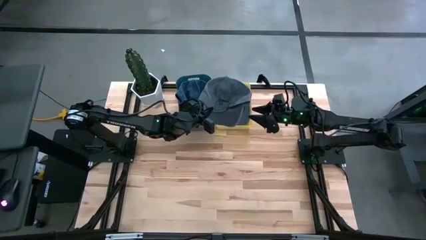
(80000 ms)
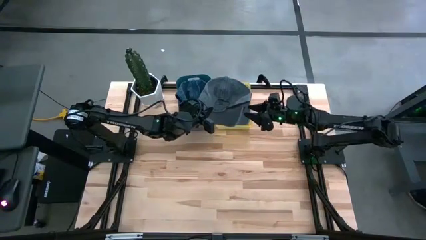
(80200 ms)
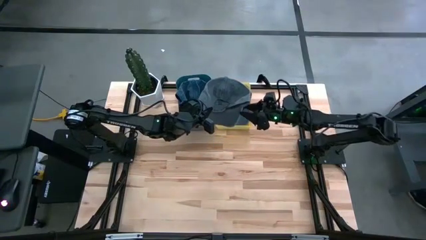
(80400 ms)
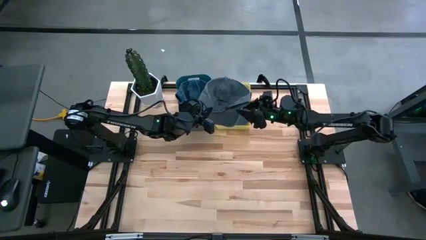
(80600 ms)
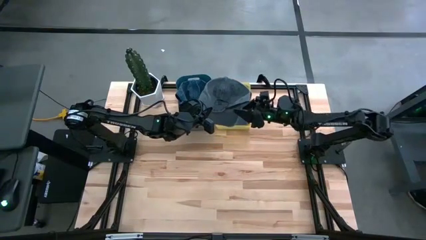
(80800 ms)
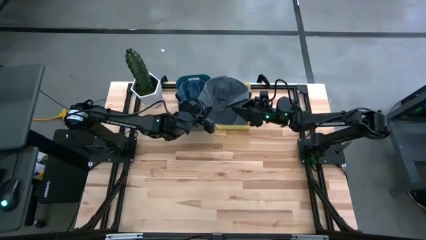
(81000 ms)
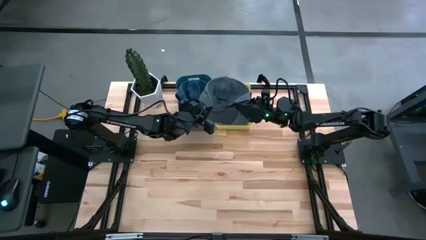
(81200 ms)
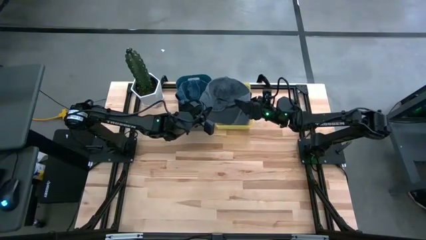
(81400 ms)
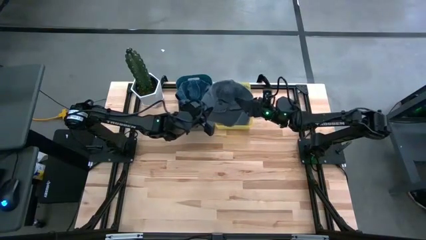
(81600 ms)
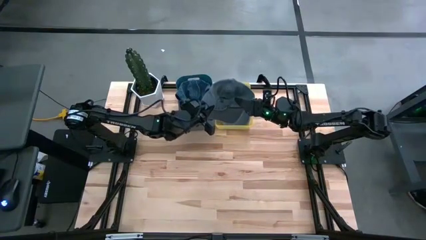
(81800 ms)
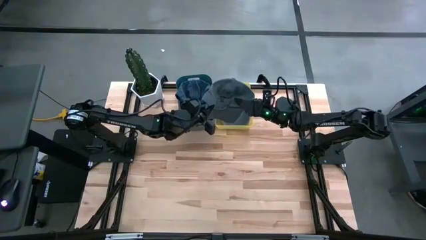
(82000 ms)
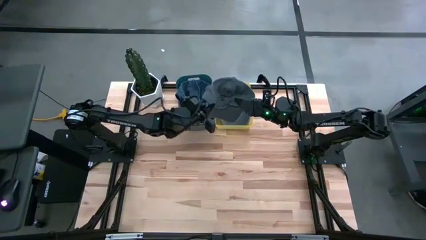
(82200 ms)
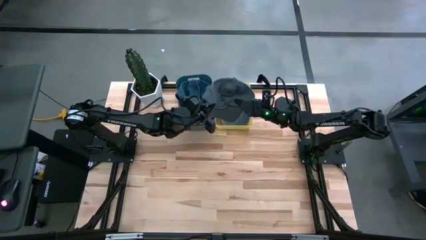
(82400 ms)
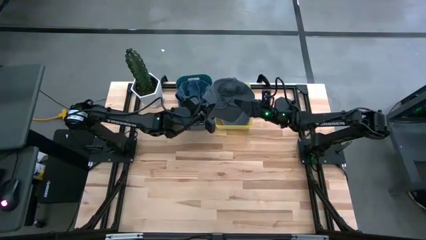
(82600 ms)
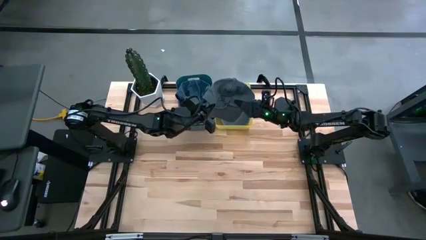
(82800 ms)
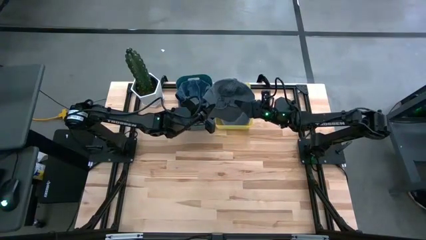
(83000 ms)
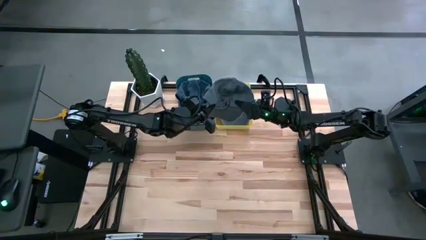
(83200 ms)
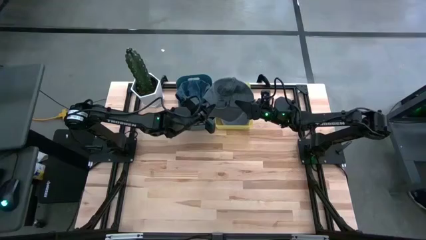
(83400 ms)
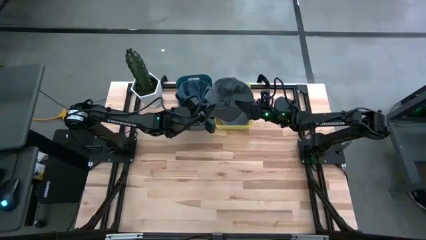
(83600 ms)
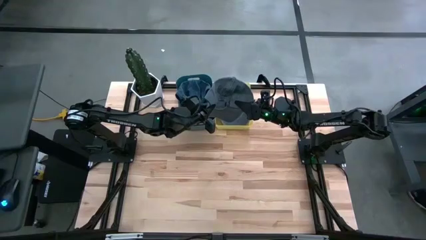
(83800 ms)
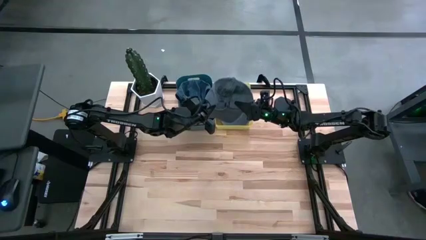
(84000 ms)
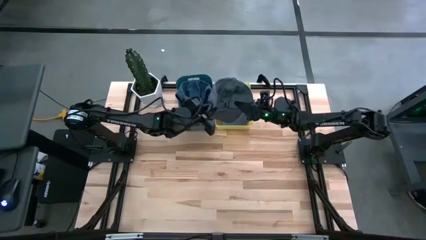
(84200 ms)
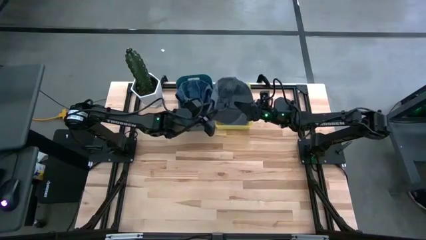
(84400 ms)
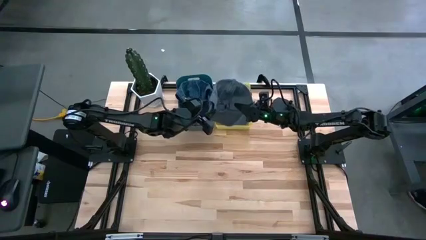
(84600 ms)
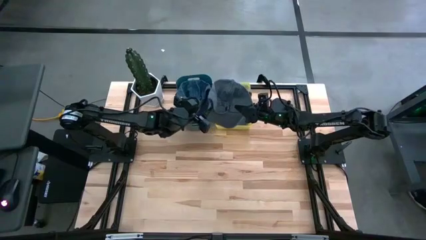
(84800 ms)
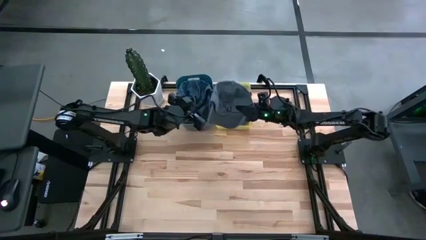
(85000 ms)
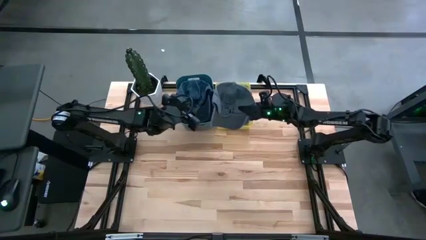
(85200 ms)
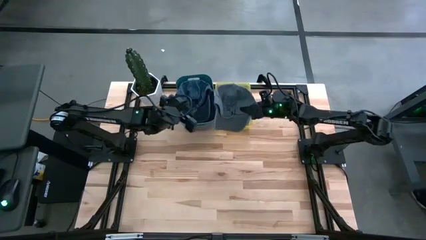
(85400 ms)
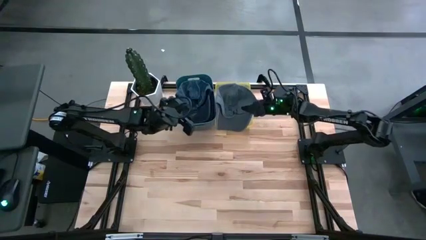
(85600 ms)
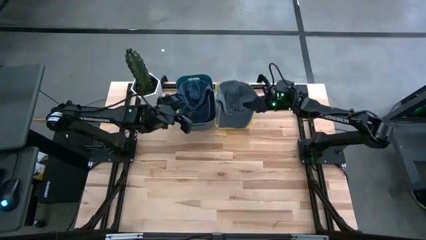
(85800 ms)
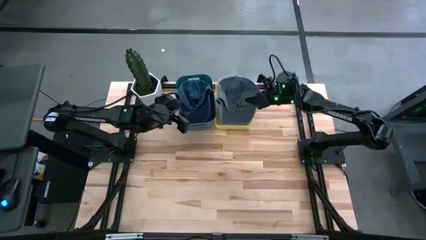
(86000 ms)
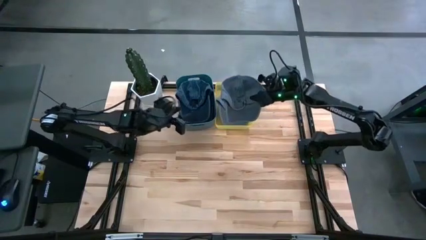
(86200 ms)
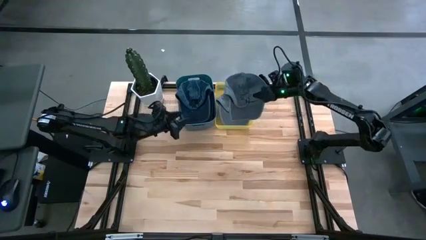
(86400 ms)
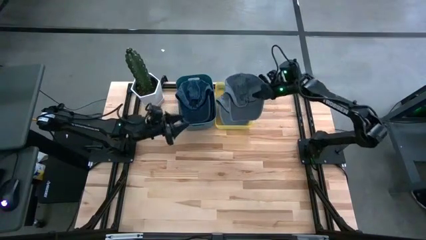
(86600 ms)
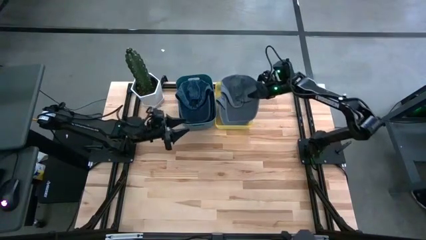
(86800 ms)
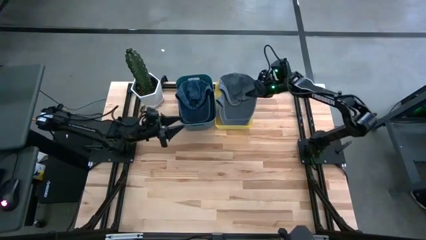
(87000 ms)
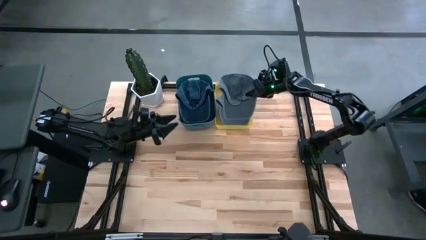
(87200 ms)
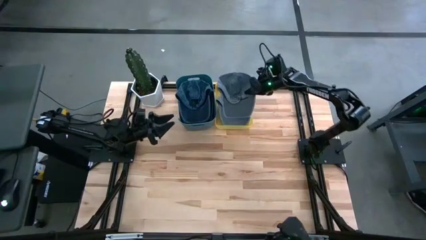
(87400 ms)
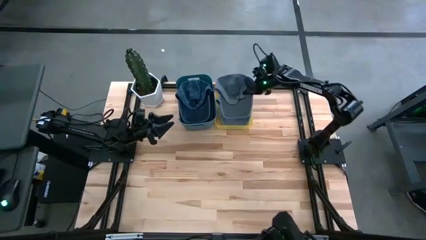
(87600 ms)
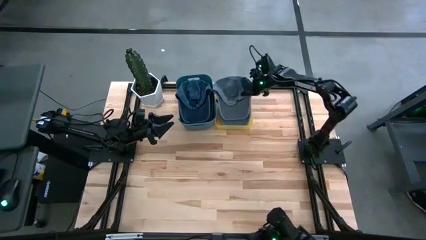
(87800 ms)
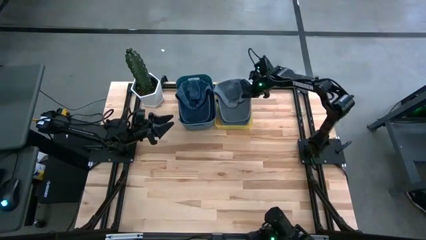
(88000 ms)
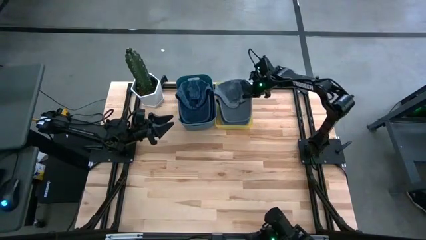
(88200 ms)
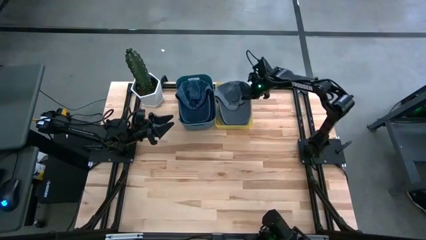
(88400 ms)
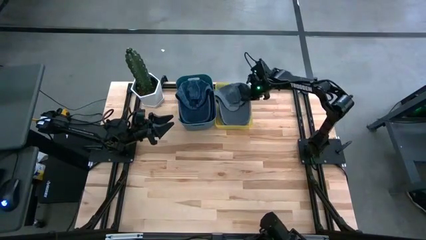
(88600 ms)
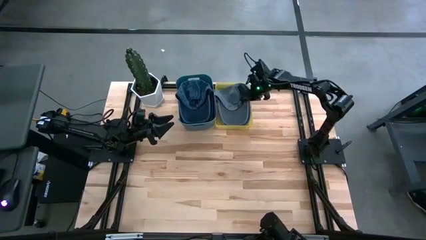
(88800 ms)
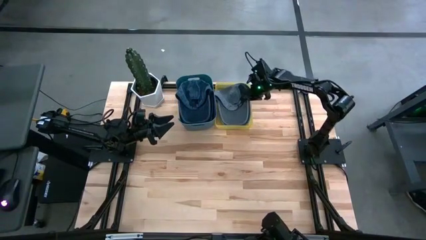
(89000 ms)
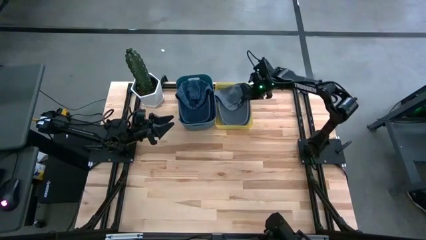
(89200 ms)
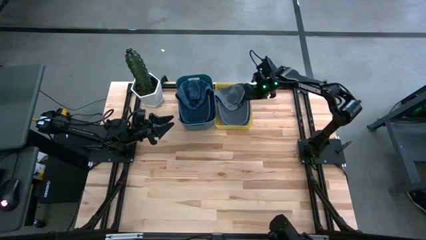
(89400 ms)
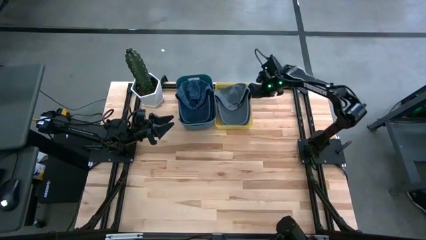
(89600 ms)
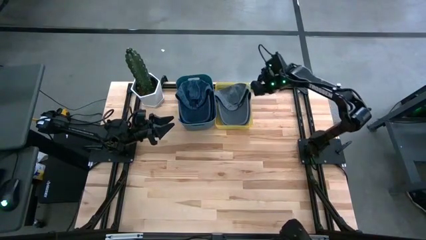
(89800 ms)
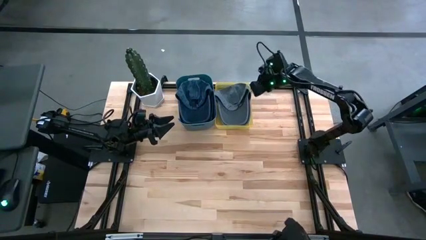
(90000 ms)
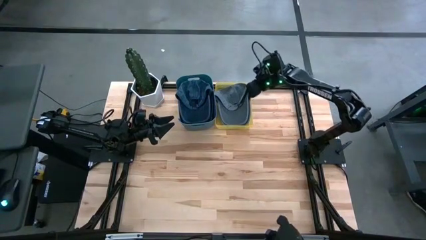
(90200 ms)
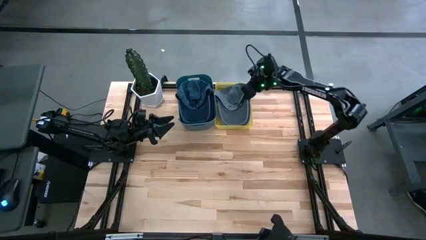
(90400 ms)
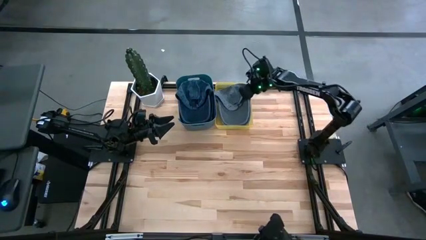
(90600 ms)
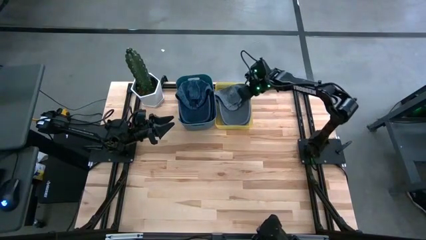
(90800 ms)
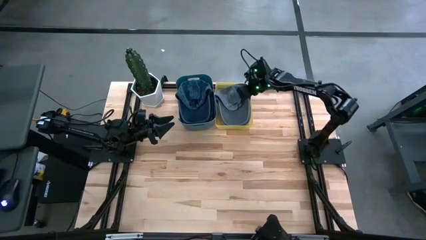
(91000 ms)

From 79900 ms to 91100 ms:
Task: Pick & Place hat
Put the gray cap into the yellow bin

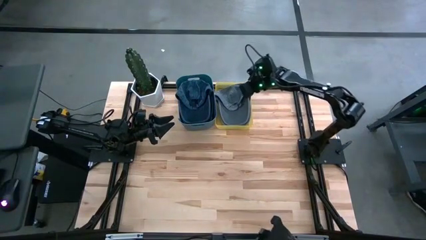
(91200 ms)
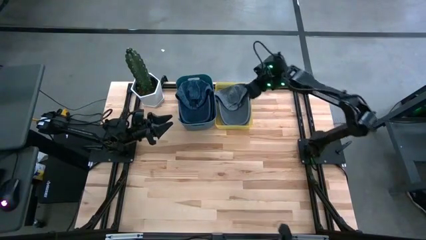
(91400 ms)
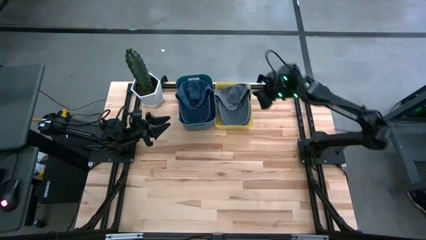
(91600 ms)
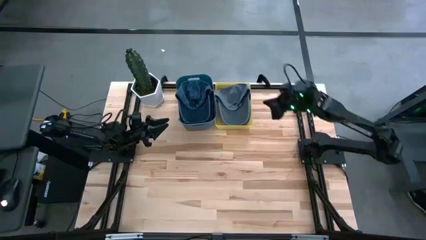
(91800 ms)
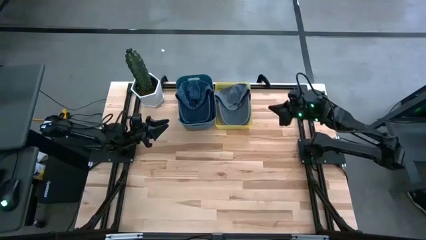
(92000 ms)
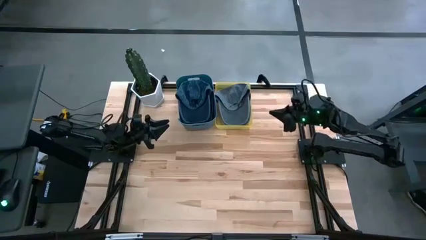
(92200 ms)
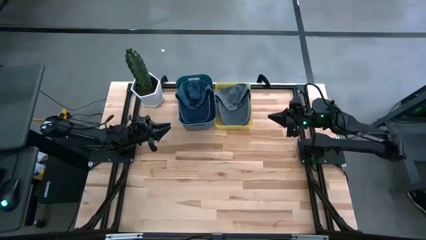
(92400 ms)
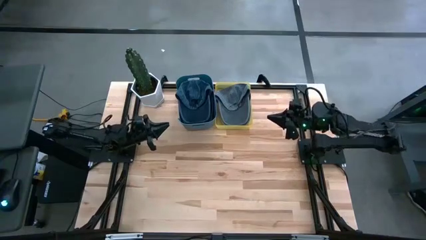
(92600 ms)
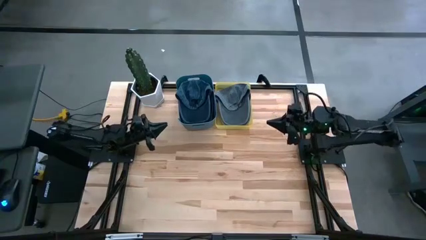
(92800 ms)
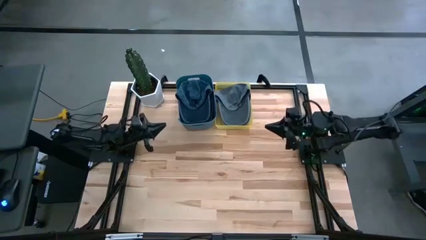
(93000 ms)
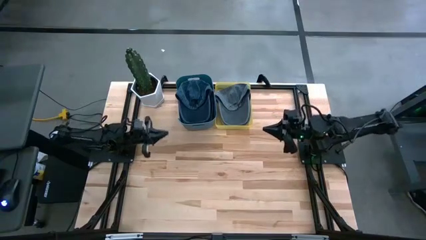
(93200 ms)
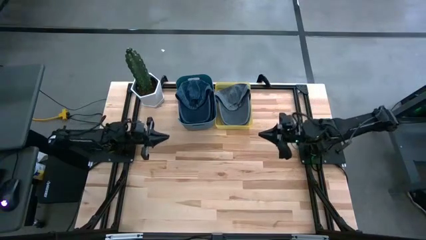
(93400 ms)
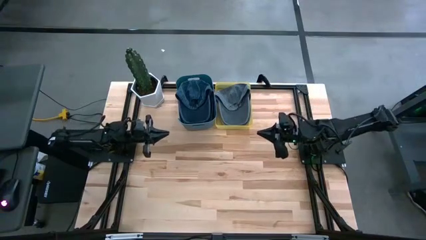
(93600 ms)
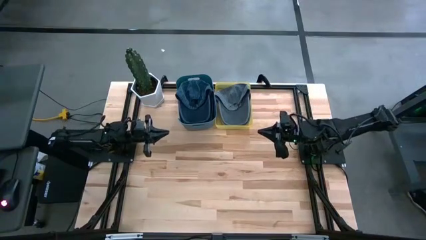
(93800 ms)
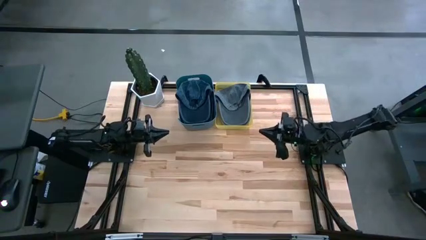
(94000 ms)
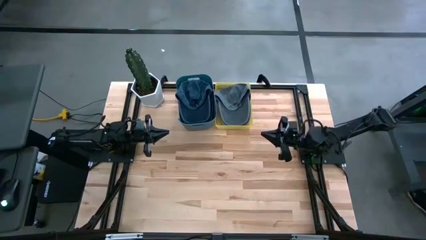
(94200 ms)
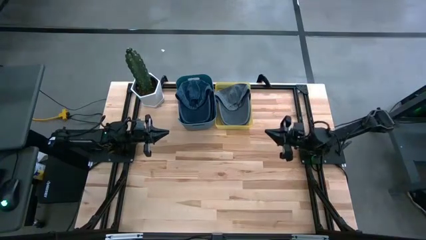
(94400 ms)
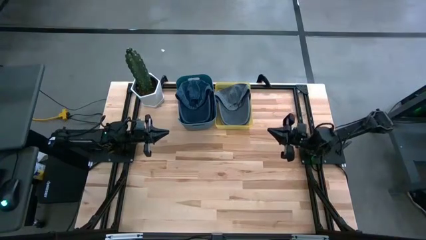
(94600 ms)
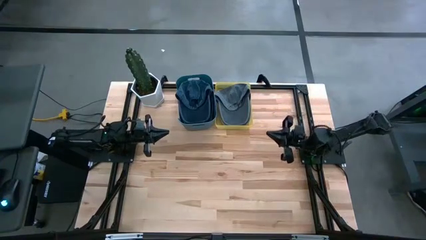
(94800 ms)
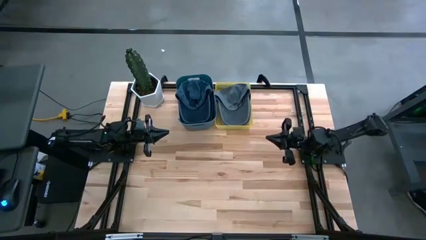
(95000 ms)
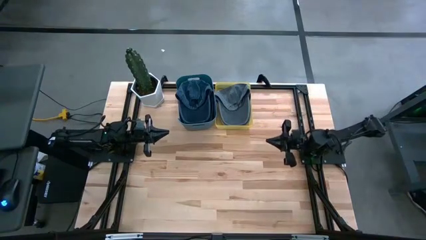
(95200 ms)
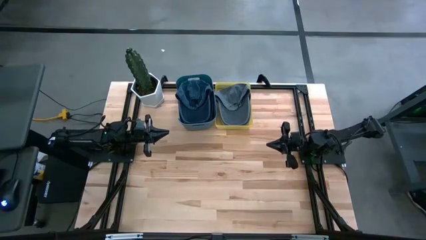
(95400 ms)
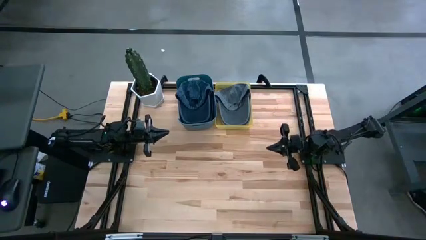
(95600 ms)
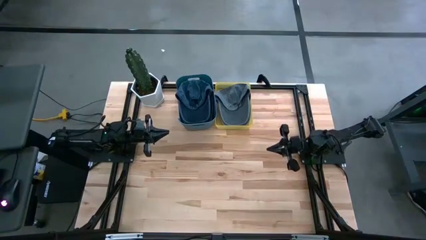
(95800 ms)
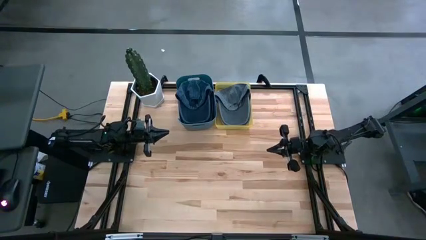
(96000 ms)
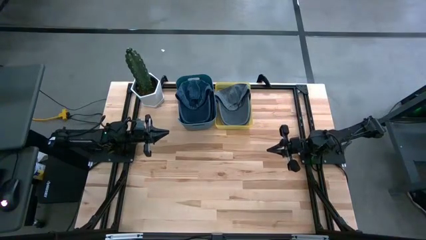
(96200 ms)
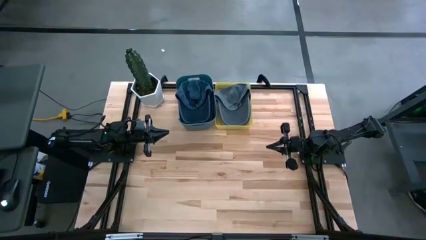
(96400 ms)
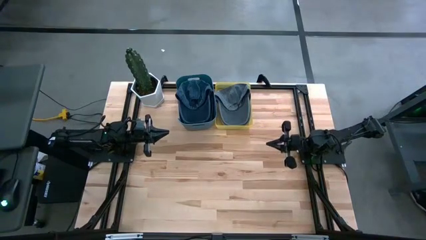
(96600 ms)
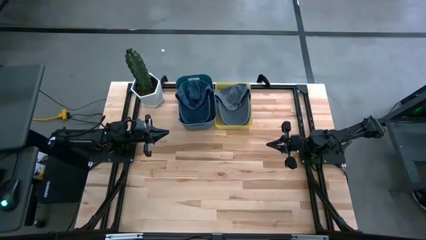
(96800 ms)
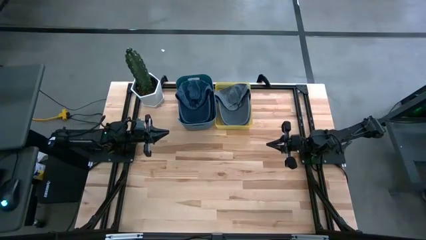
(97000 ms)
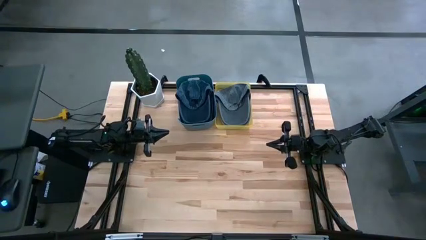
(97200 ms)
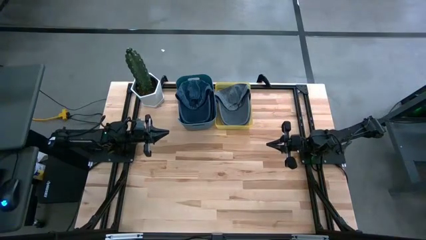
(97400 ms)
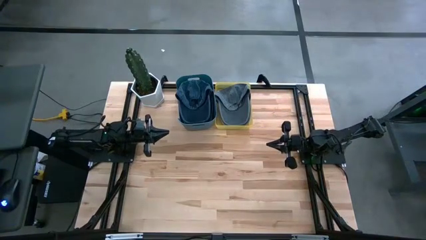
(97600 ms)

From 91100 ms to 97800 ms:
Return to Home Position
